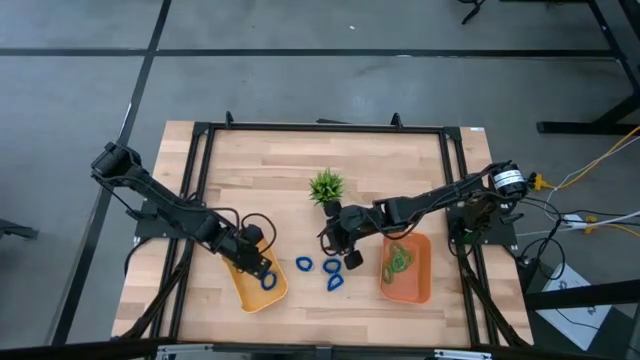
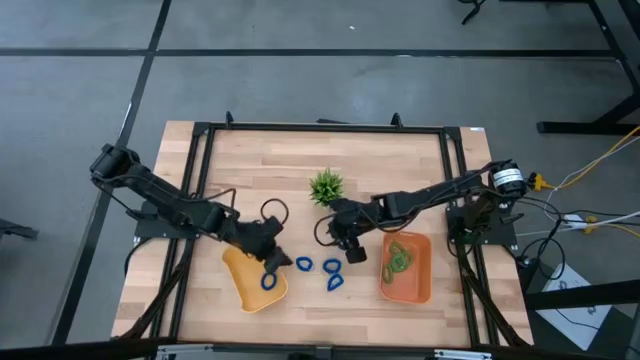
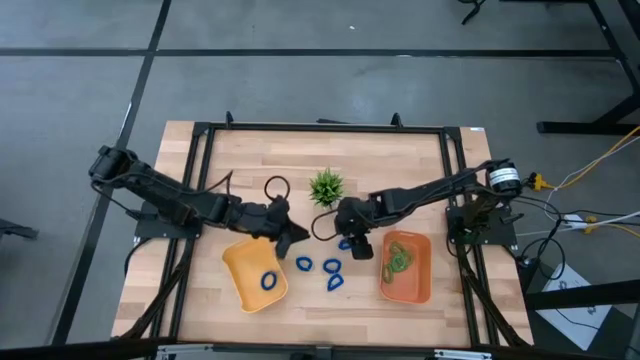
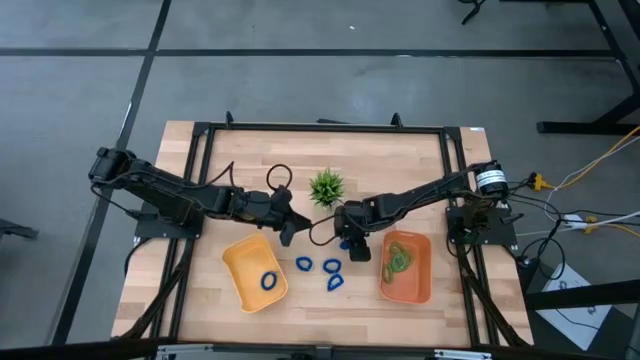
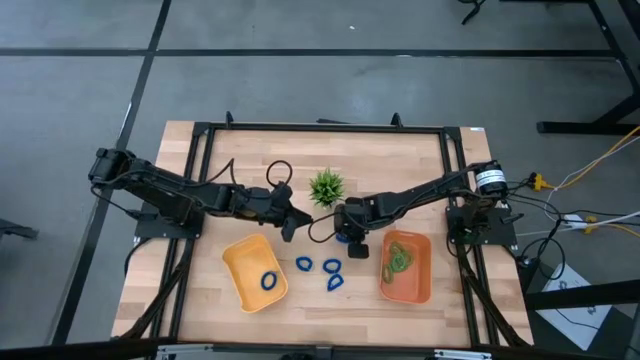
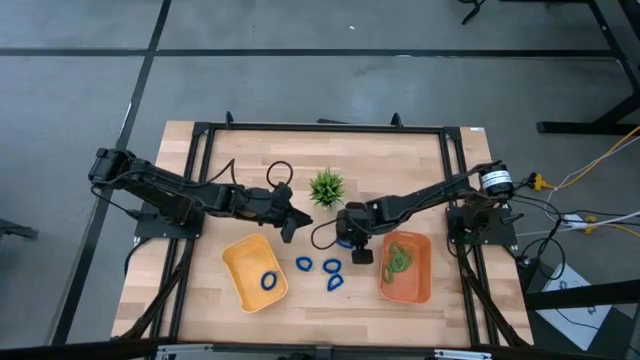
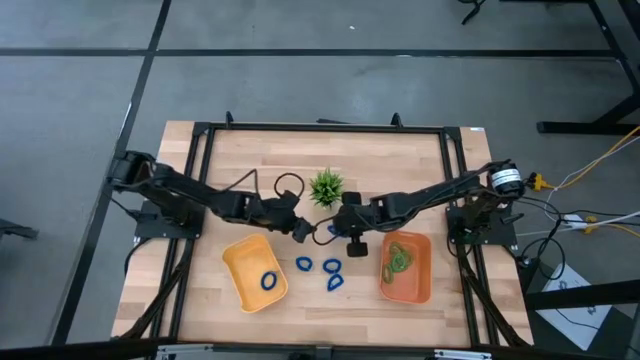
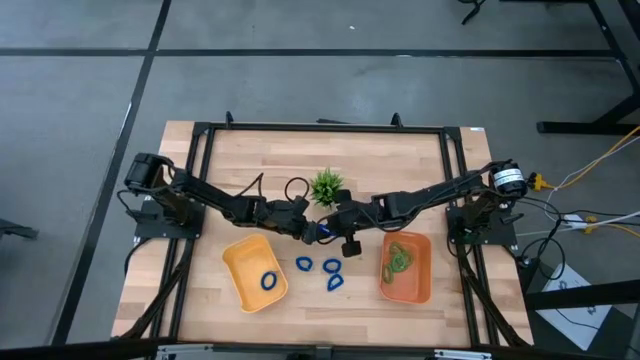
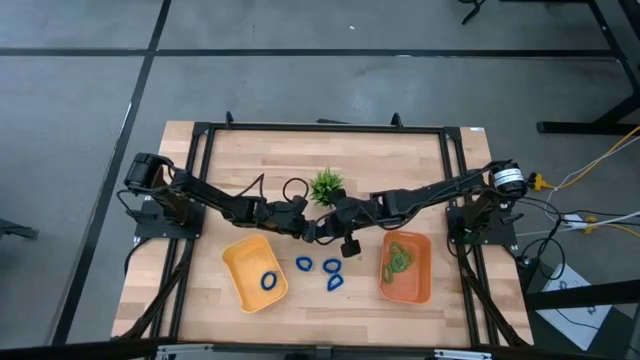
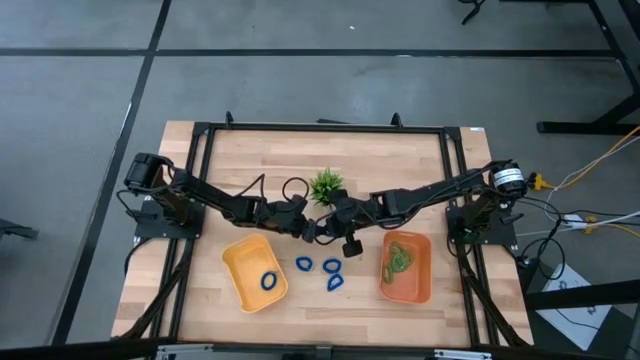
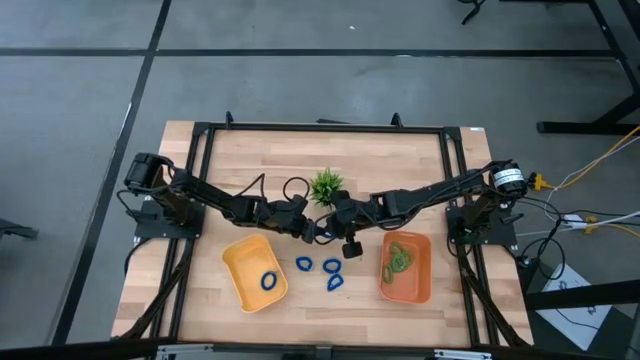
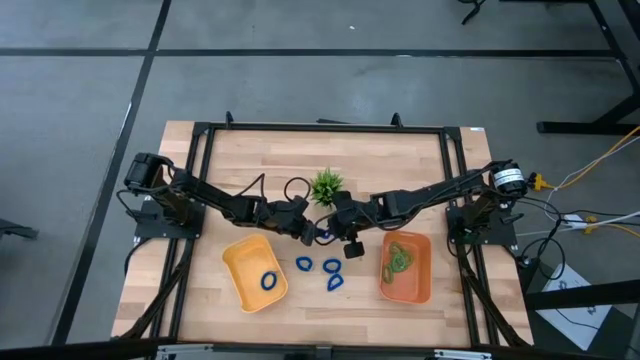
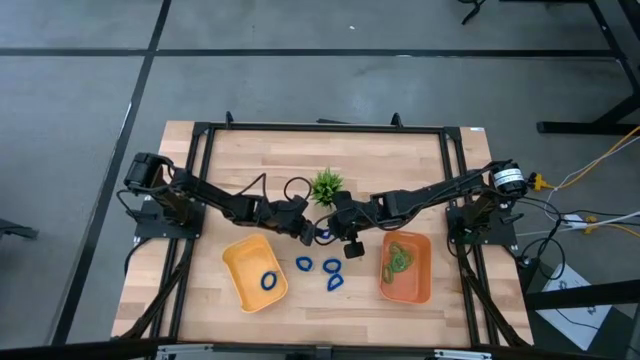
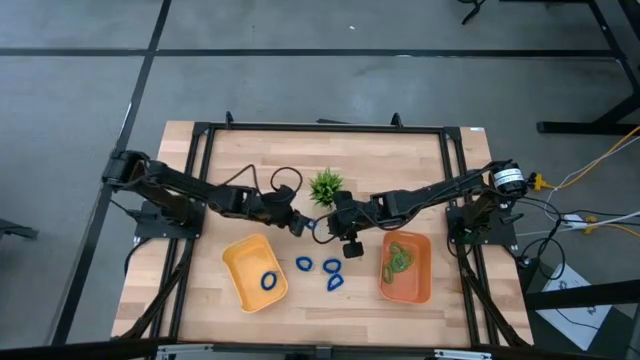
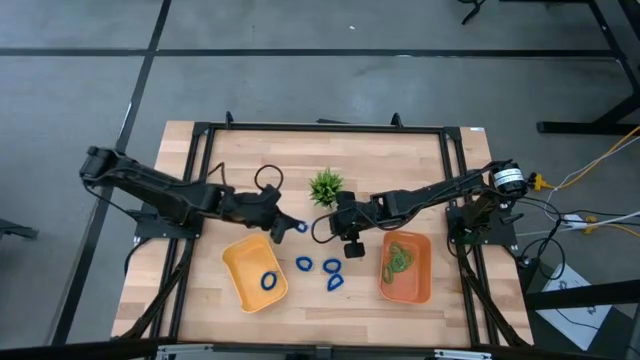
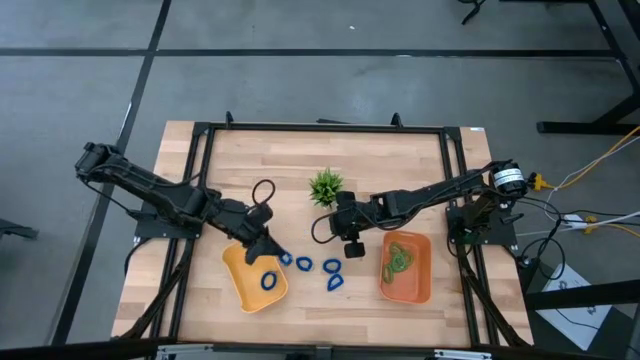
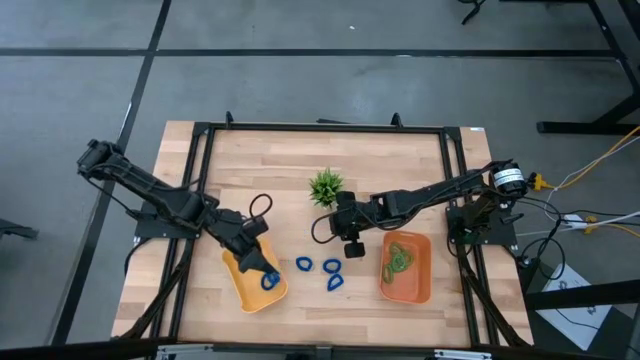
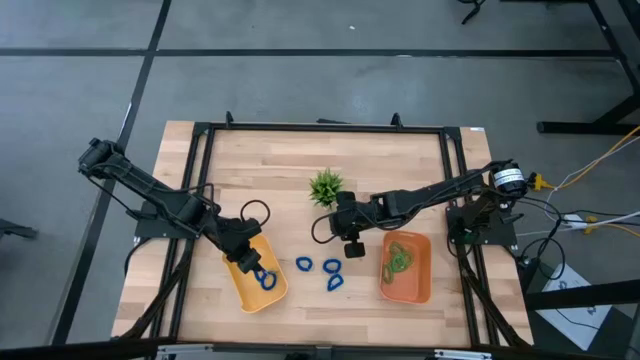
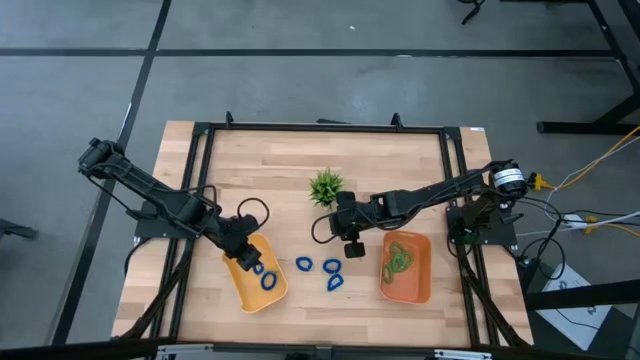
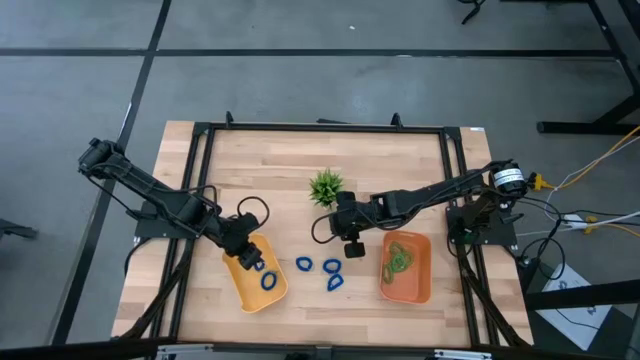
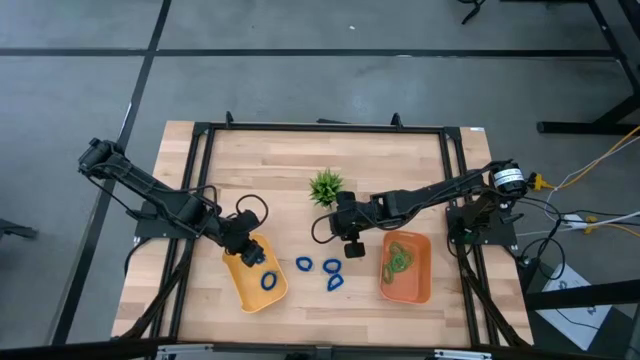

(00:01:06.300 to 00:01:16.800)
Task: Sort spring keychains
Put the blue spring keychain into the yellow bin

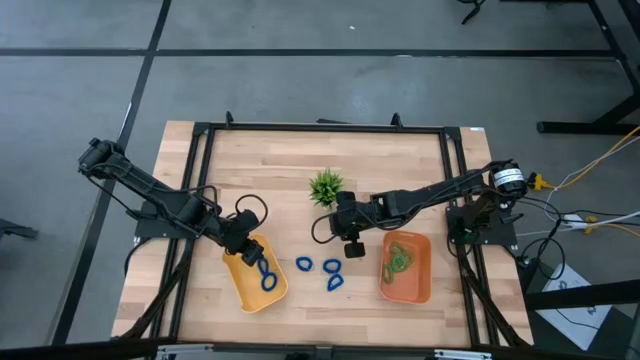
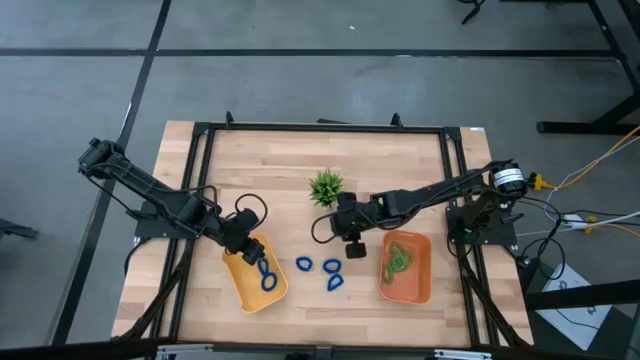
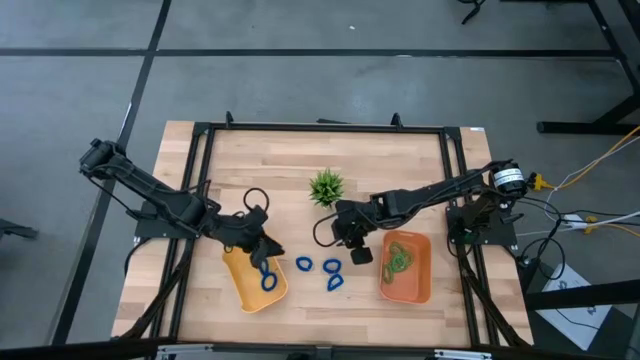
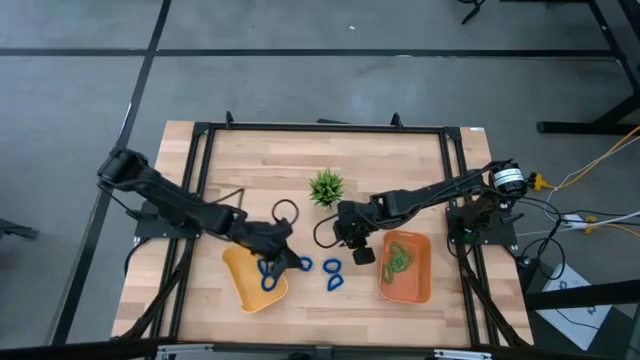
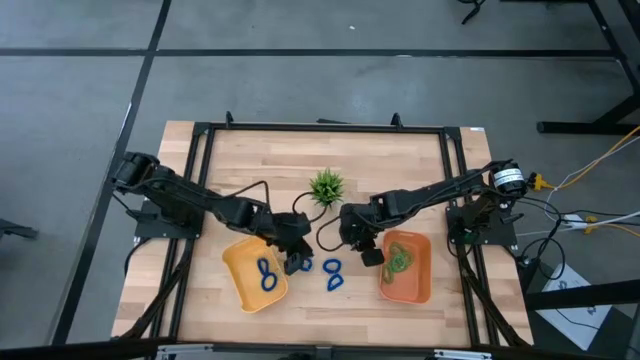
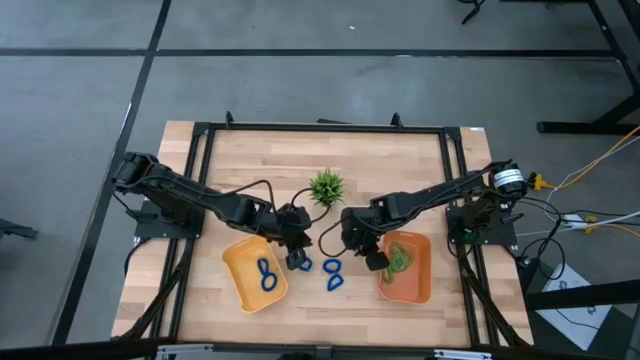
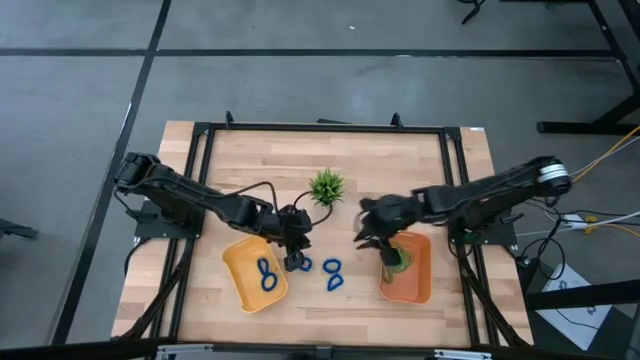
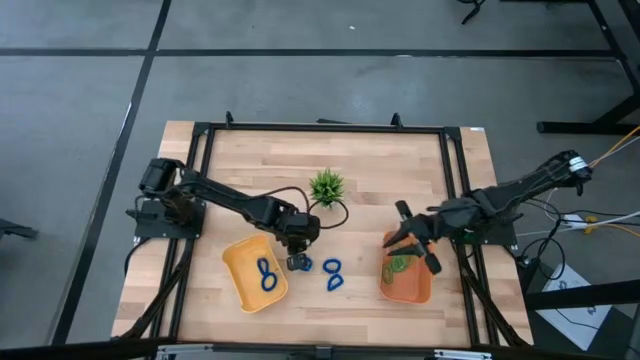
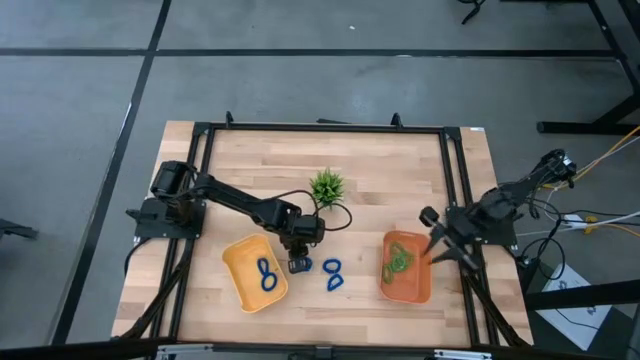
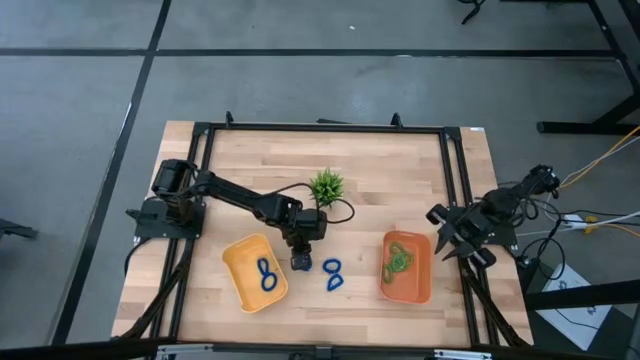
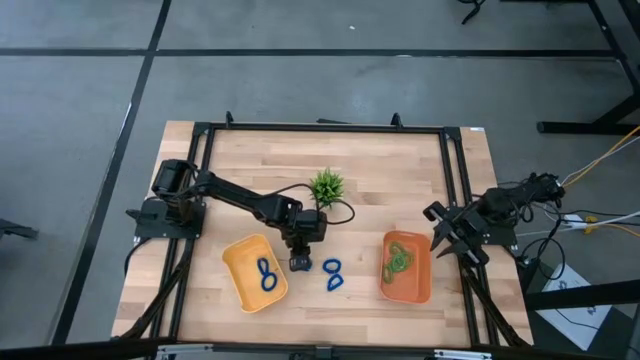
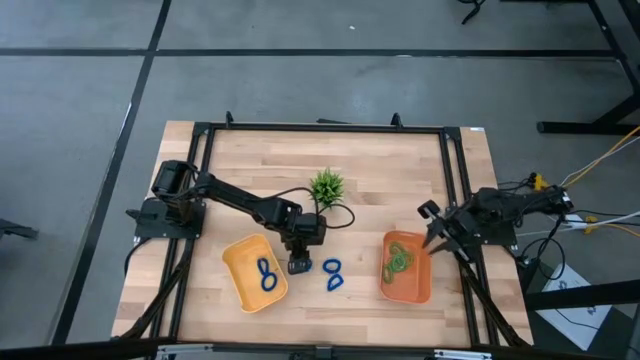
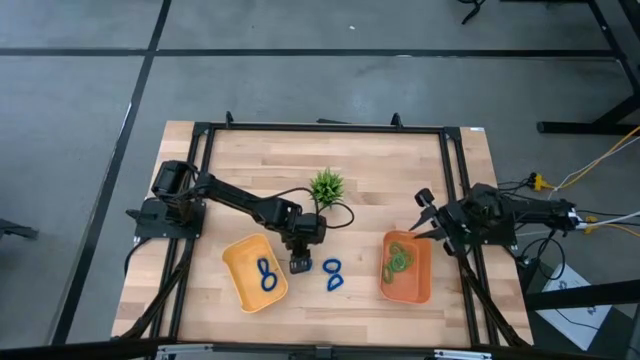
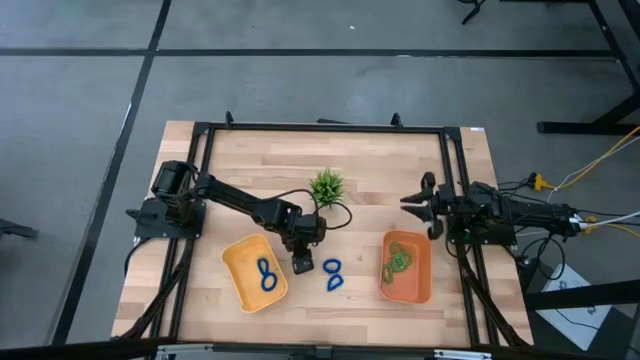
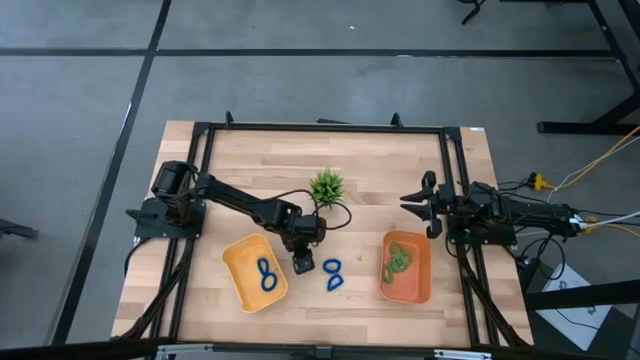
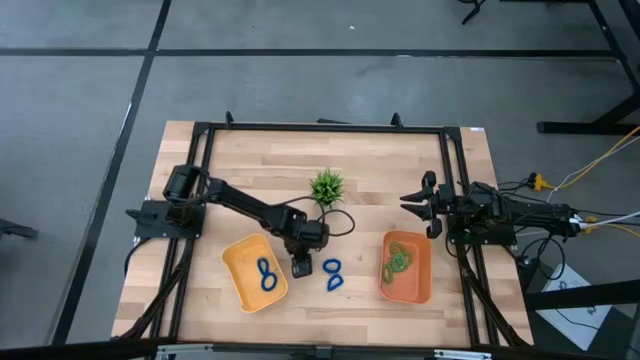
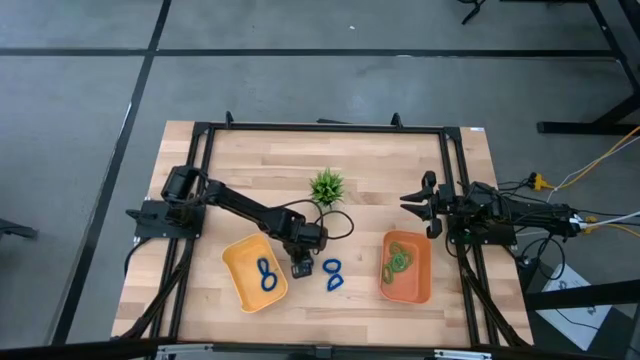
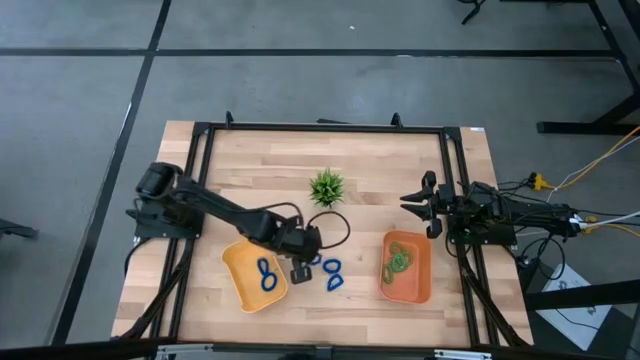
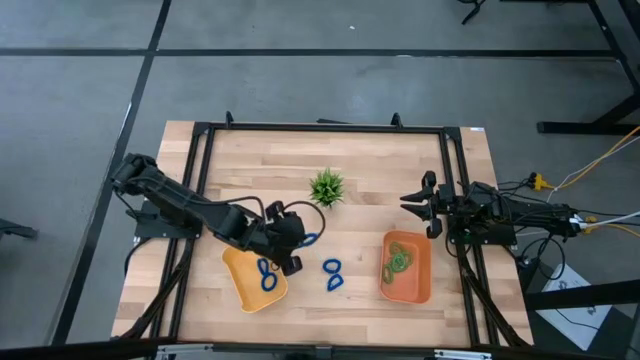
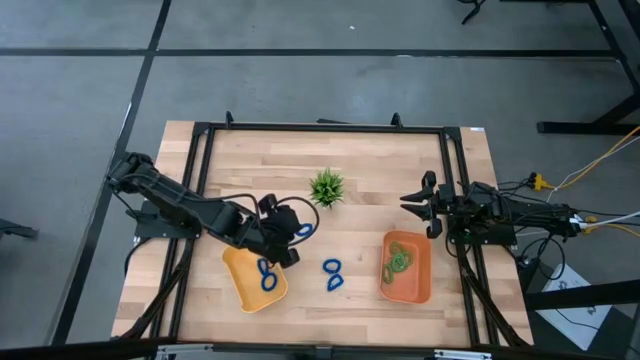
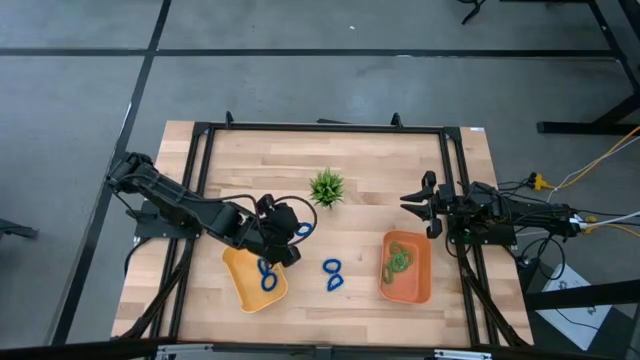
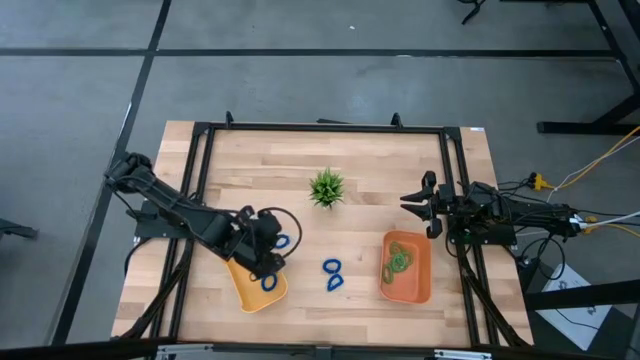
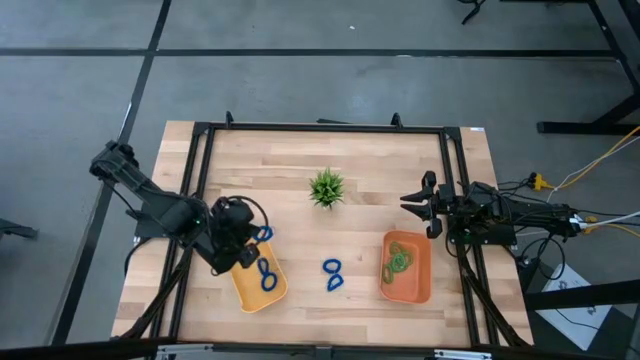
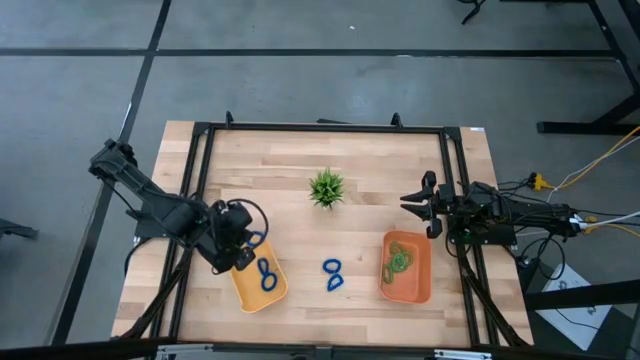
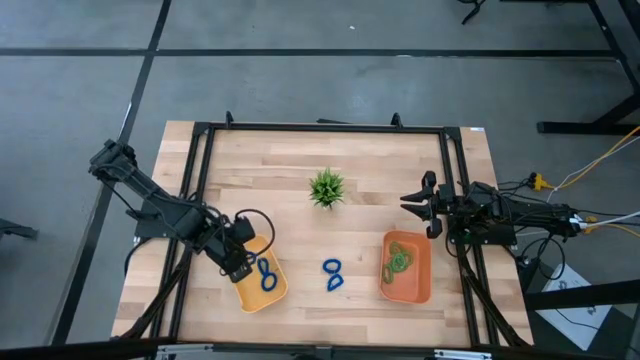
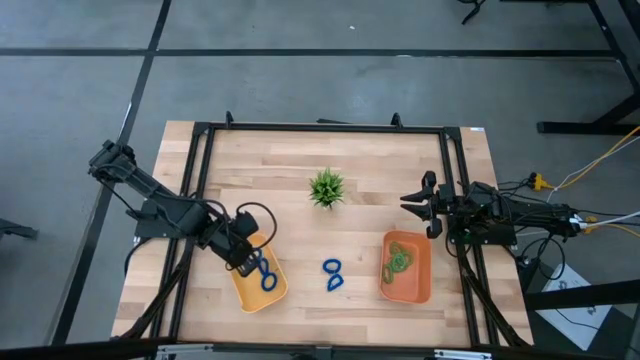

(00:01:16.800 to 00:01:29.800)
Put the blue spring keychain into the yellow bin
